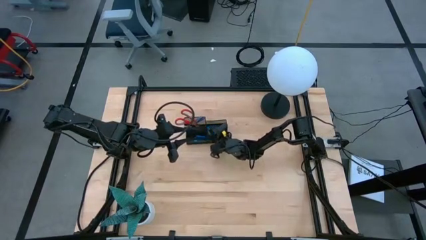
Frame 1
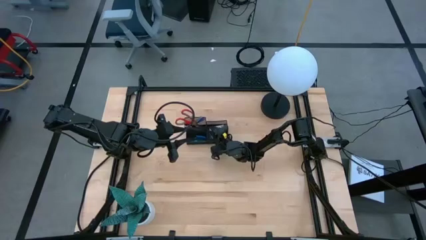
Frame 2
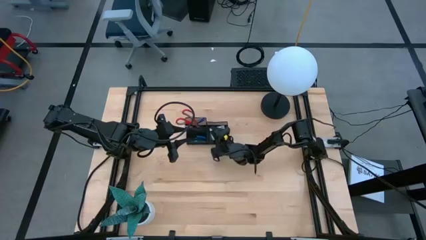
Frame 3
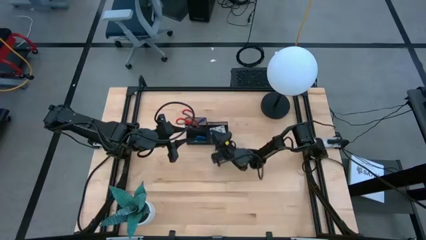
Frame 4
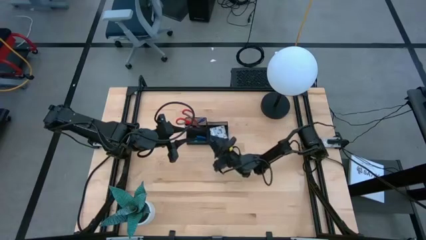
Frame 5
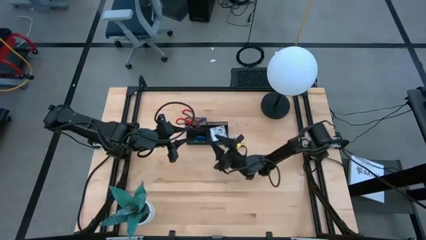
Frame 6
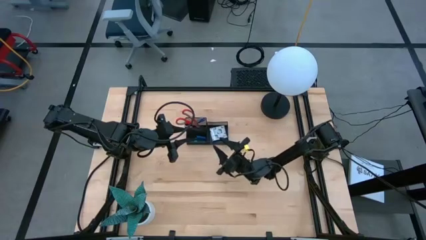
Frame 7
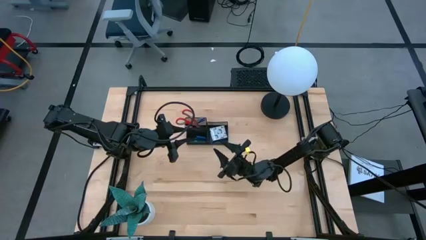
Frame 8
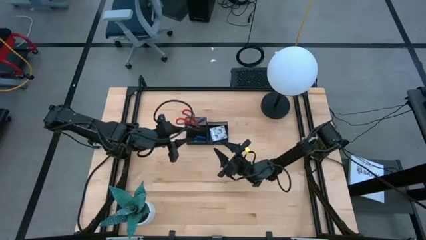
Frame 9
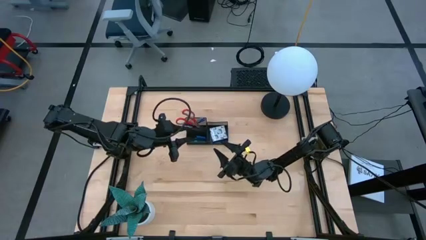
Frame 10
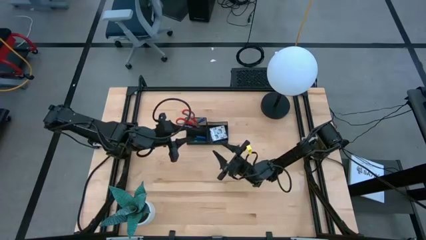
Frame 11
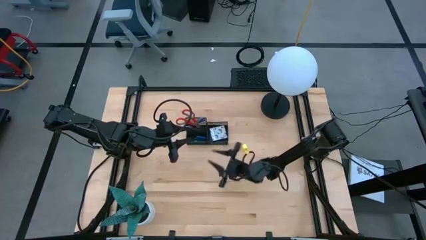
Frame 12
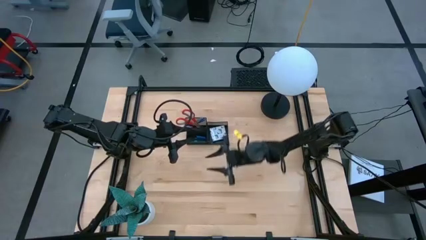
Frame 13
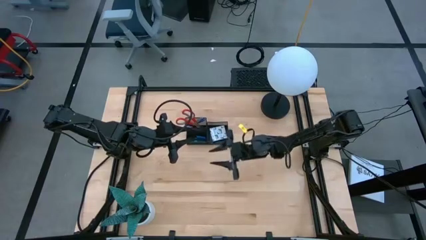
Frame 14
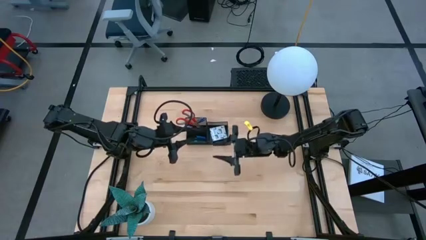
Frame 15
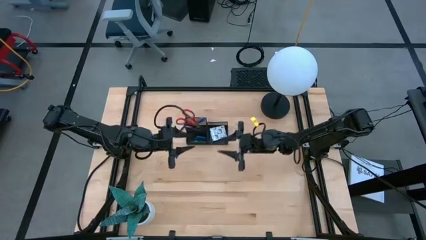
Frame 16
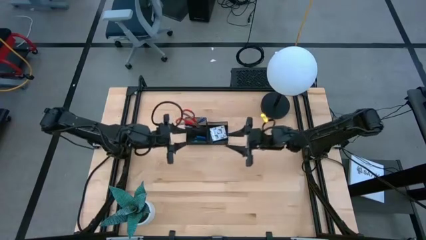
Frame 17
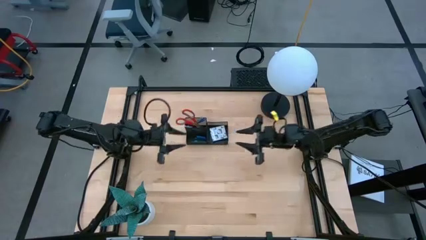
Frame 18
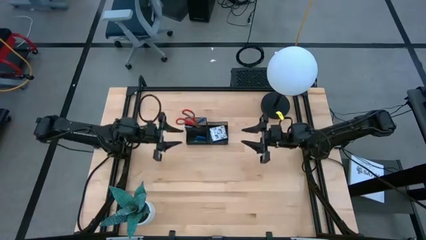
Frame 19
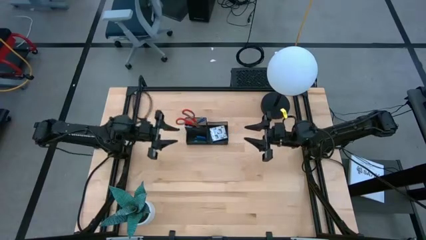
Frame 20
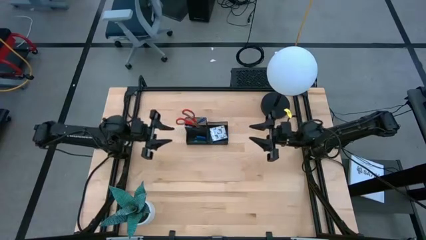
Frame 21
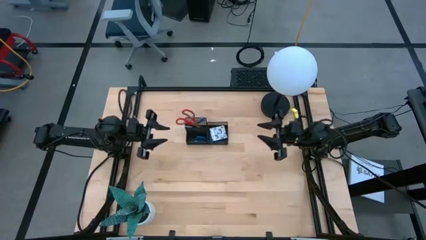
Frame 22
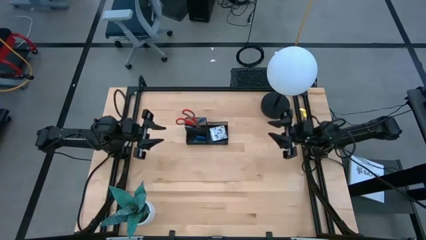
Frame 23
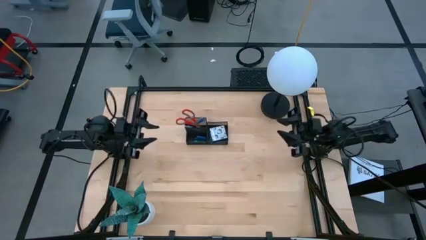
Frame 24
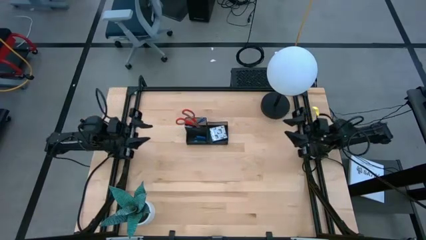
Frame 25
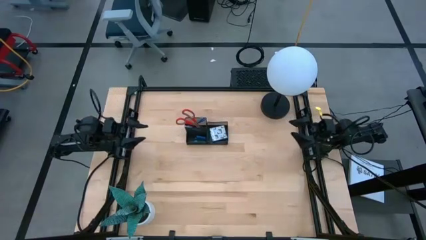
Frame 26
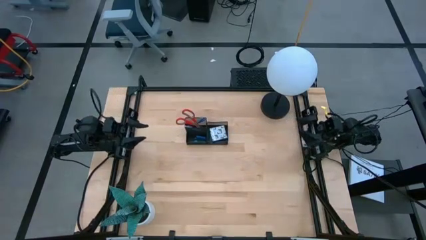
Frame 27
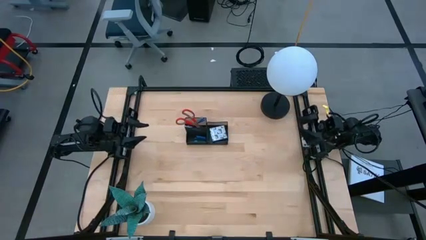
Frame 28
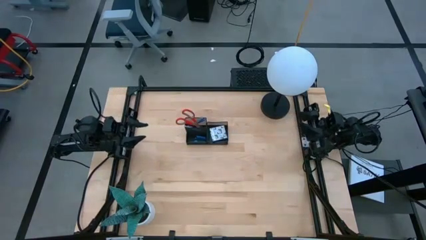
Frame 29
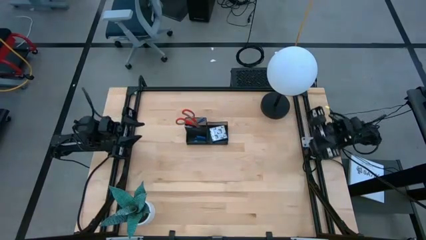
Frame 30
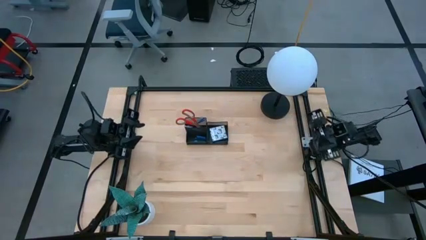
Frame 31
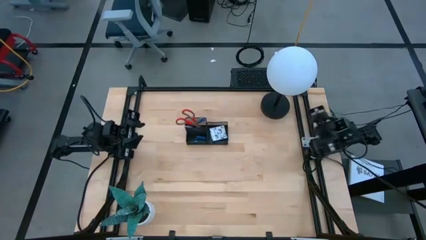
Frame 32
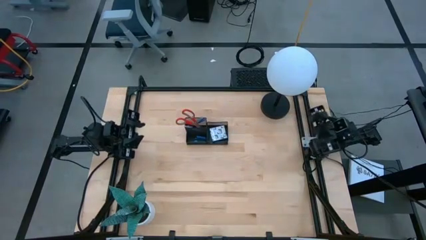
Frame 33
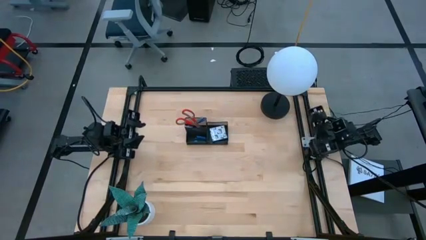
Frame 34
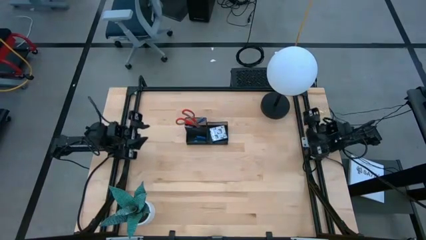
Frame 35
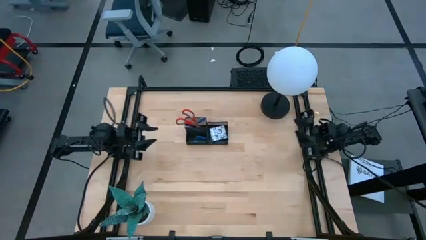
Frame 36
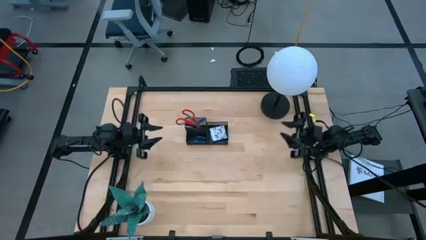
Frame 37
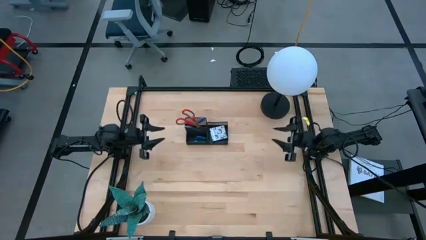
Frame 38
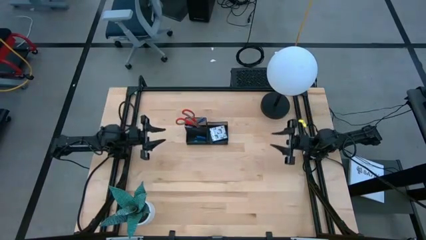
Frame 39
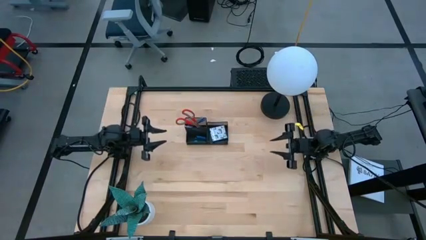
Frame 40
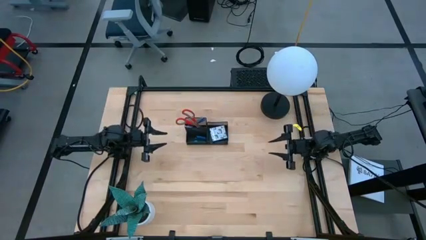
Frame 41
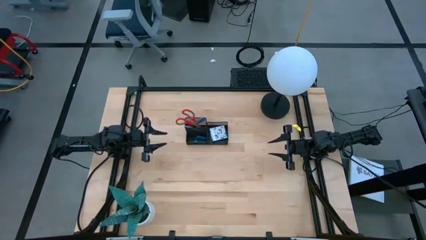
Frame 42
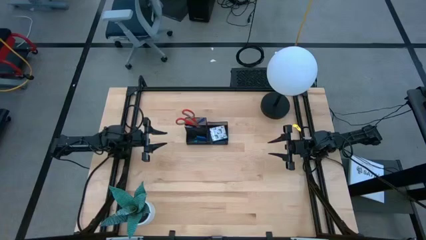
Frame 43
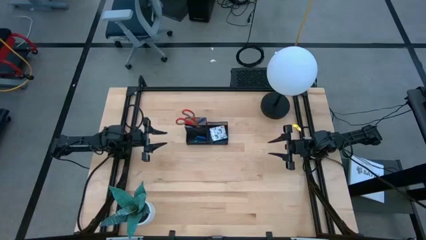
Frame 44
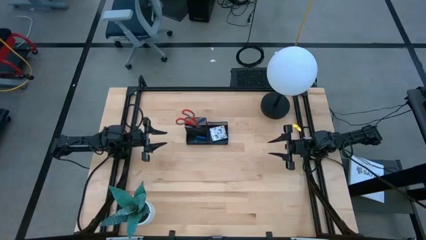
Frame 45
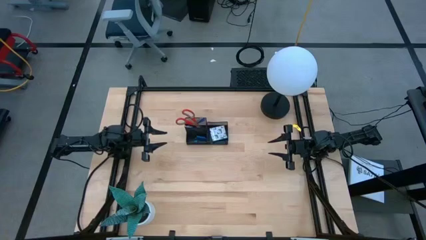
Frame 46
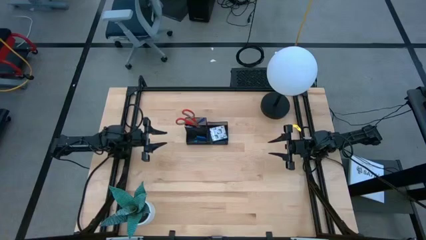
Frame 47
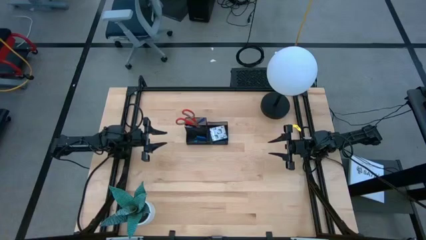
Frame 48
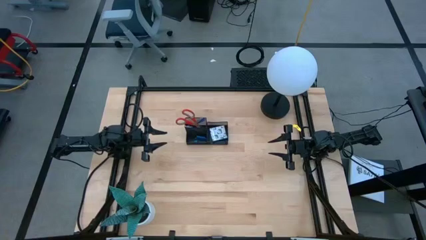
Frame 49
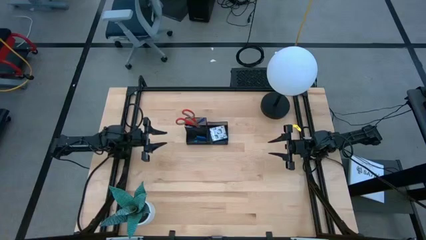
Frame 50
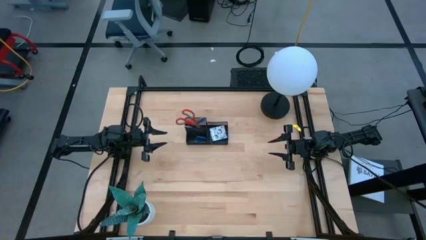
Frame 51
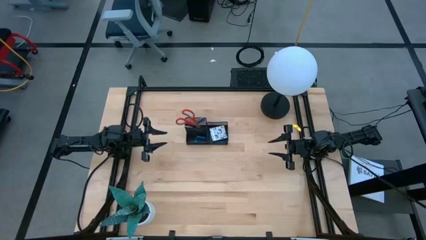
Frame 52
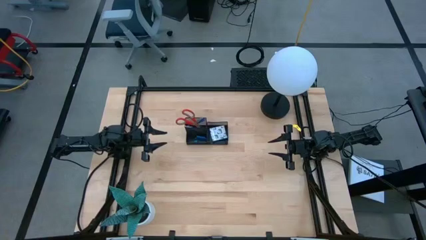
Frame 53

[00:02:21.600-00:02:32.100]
Task: Pick and place office supplies into organizer
Return to Home Position

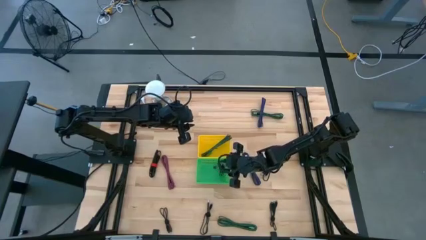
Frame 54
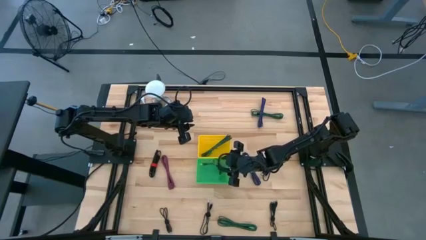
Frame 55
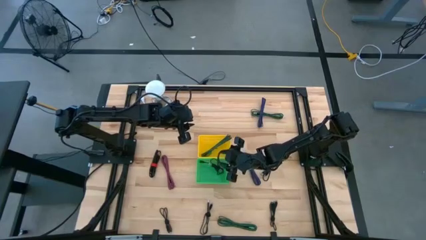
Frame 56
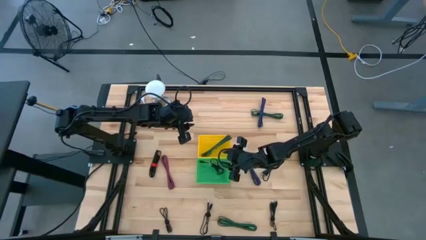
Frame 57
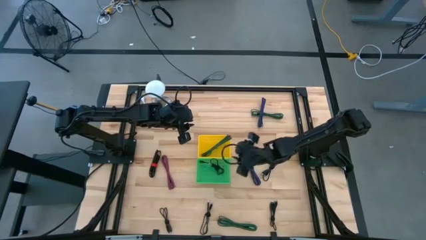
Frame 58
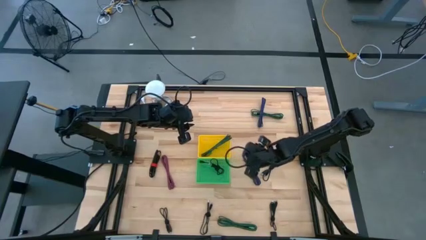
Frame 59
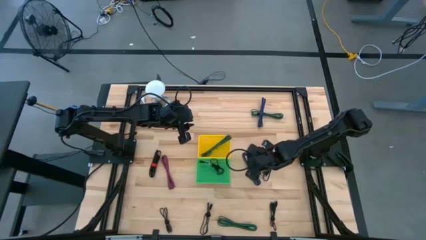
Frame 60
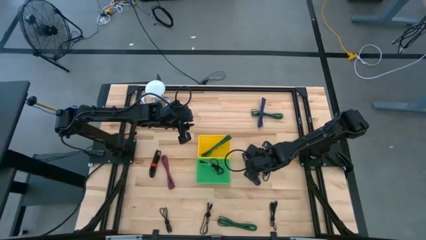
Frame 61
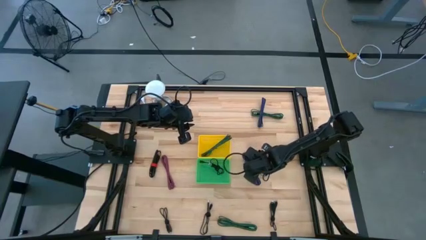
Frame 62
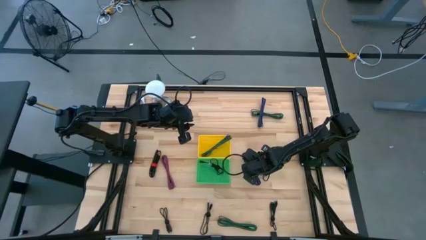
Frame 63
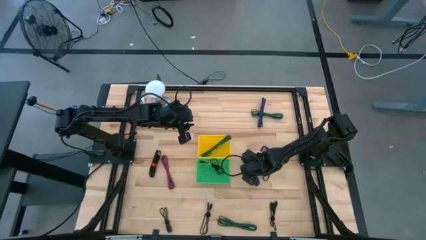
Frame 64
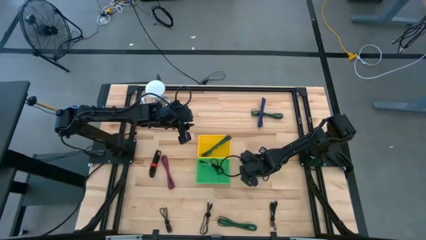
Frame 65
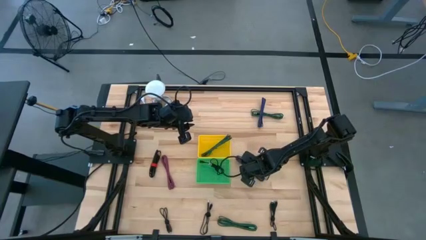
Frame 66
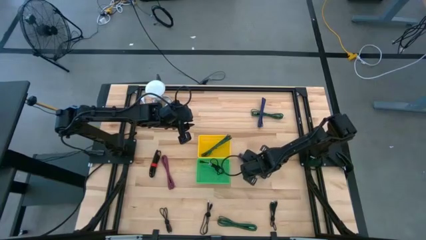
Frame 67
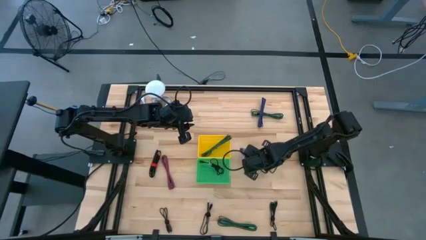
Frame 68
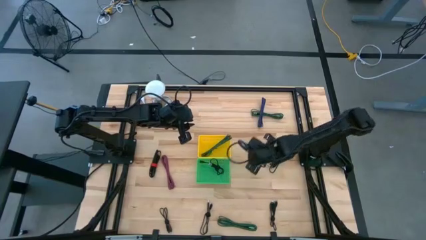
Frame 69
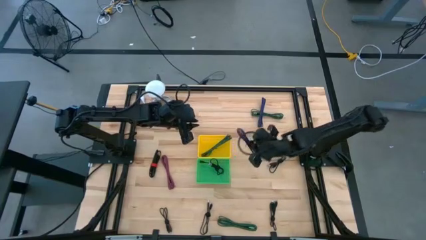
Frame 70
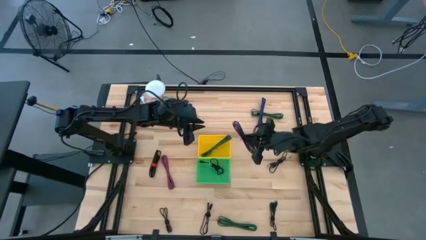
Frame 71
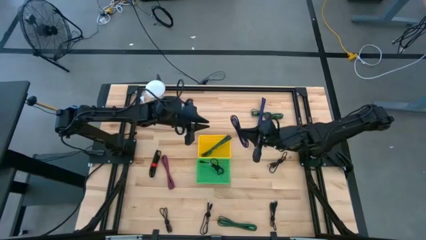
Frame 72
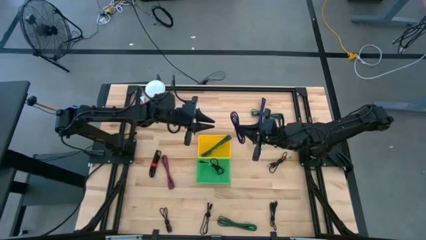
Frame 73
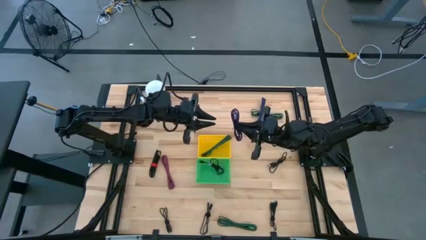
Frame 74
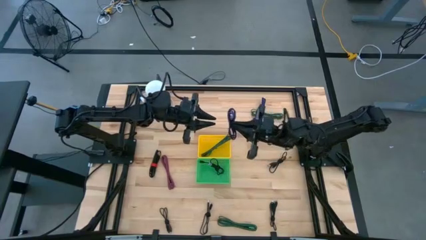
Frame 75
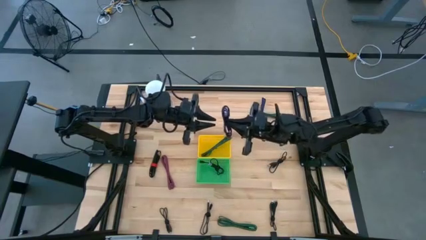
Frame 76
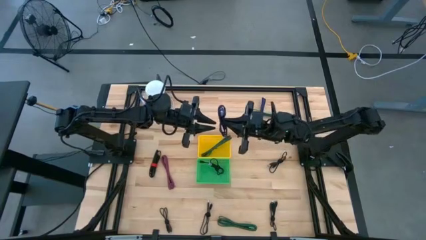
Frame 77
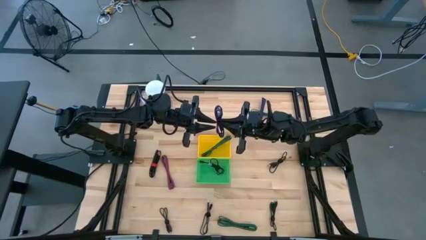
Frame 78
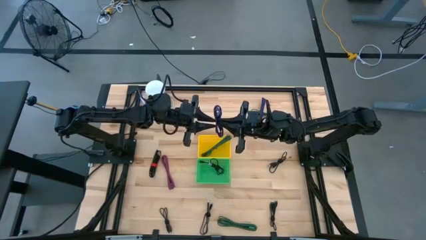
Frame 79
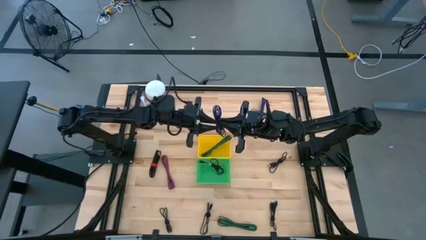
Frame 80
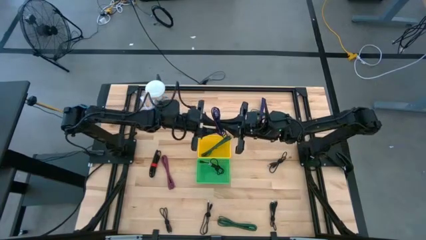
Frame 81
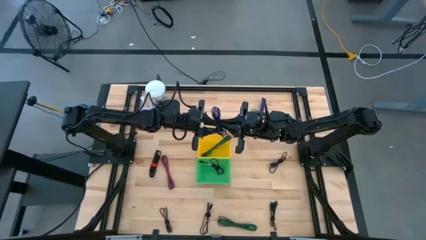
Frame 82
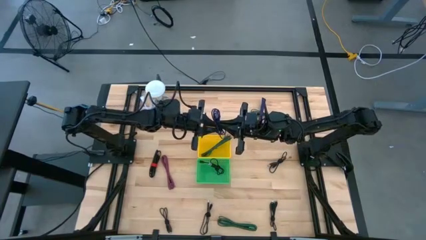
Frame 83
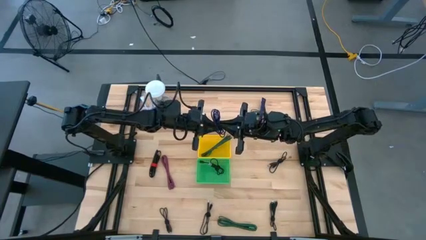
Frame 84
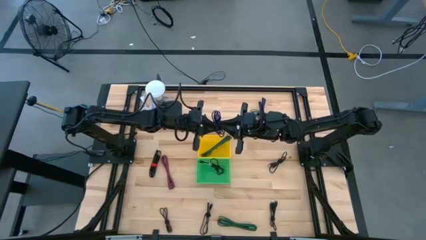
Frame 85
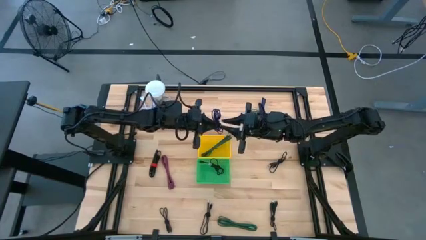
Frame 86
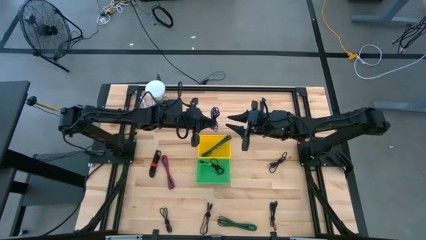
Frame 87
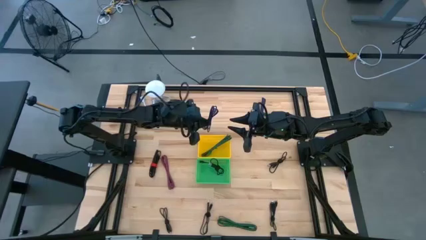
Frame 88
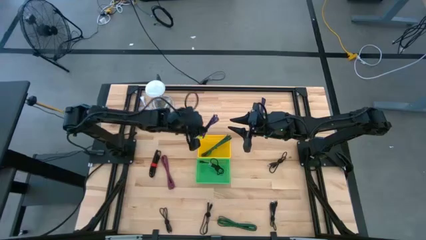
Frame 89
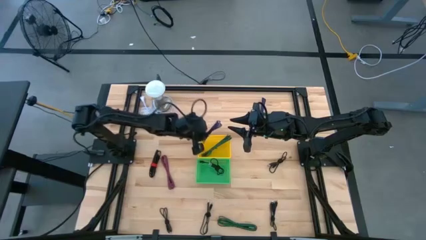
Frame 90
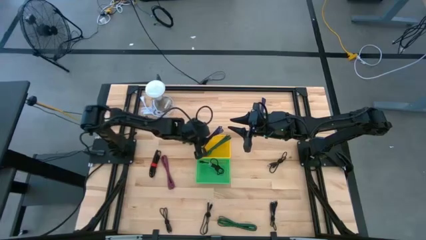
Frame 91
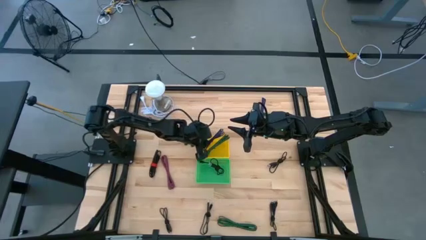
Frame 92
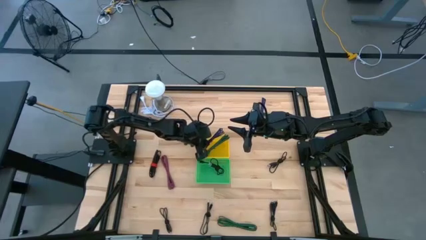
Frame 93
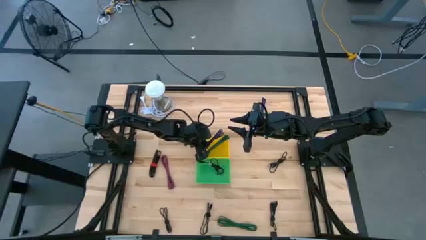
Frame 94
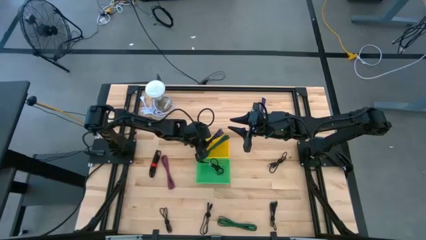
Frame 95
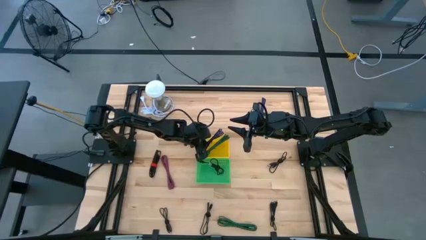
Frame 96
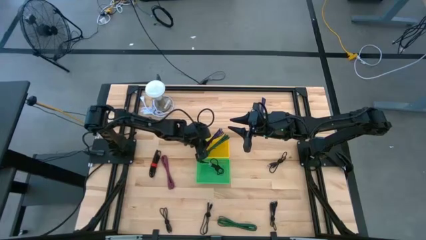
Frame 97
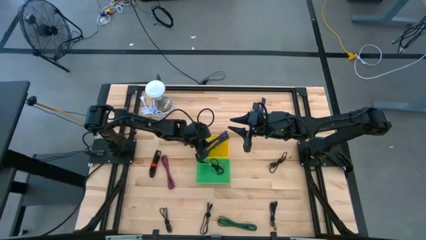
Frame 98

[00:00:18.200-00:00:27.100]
Task: Pick & Place USB Port
Put the violet and black USB cable into the yellow bin
